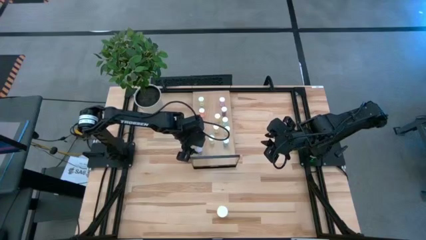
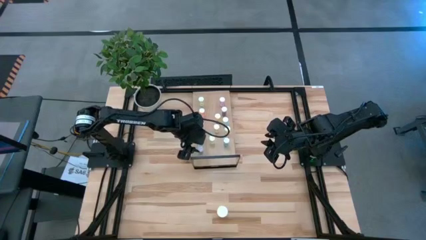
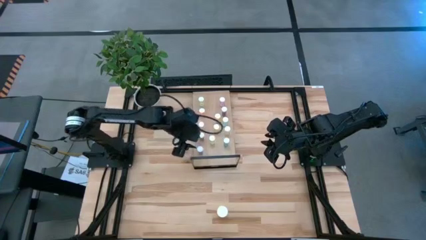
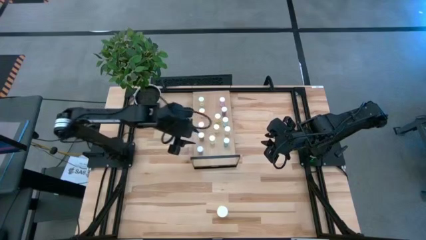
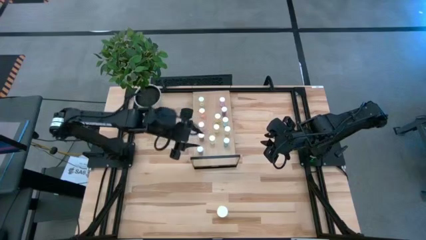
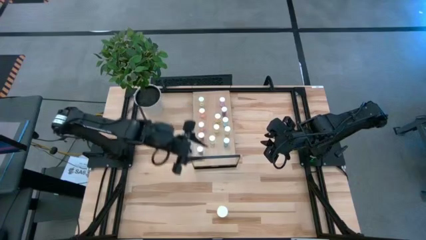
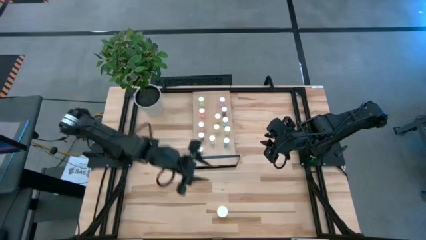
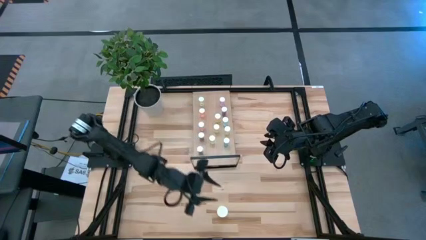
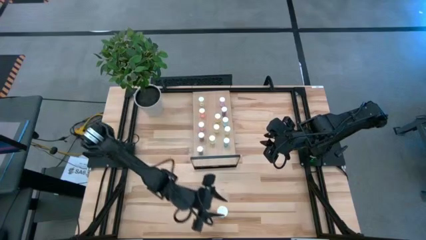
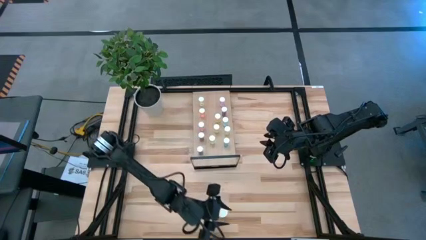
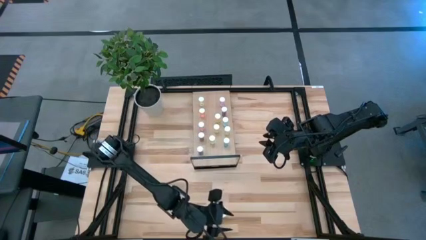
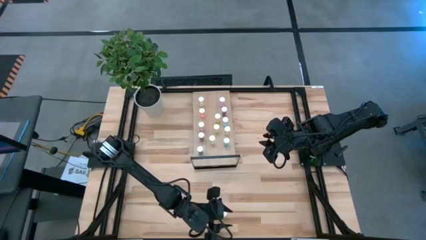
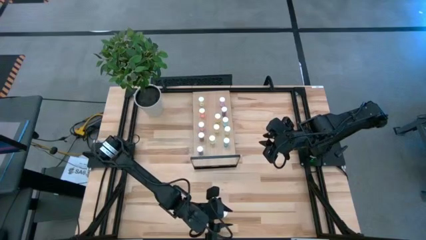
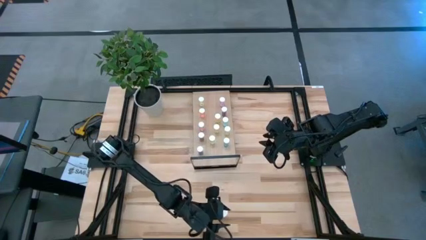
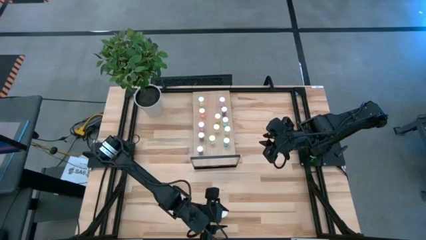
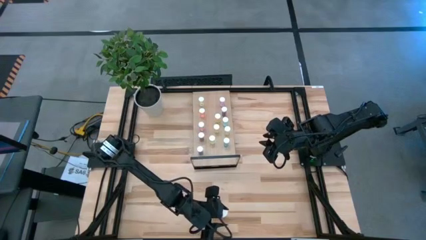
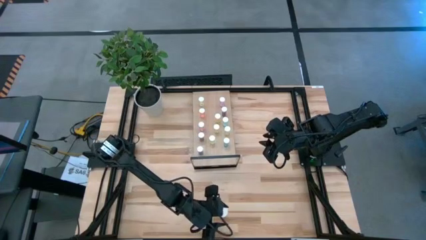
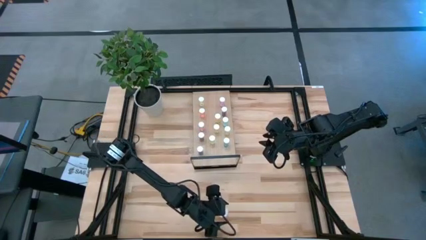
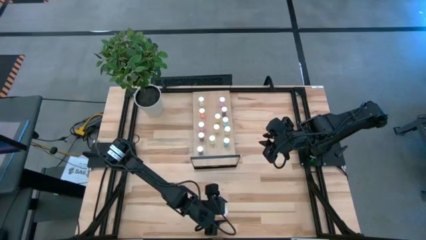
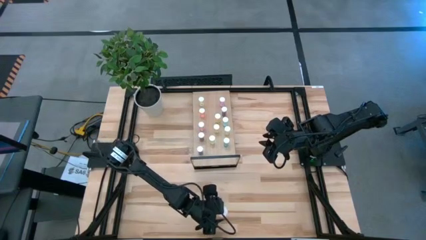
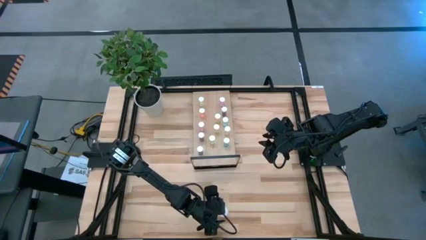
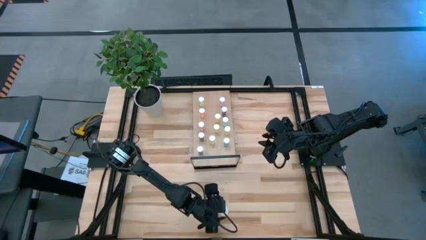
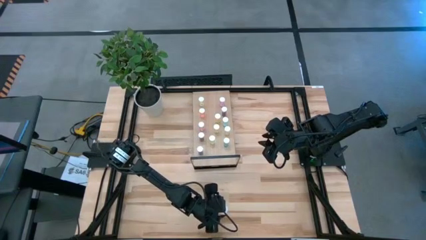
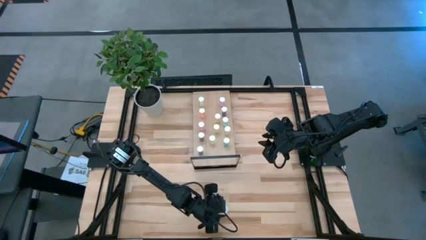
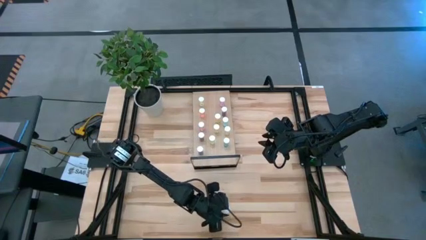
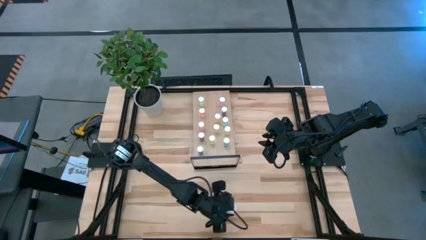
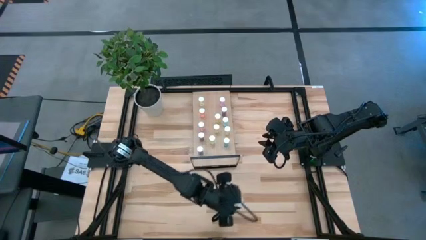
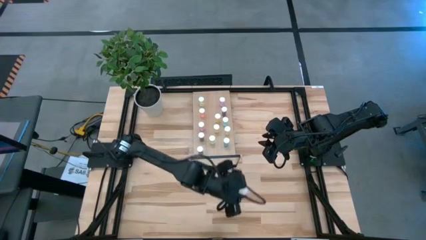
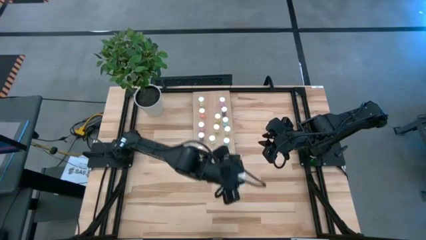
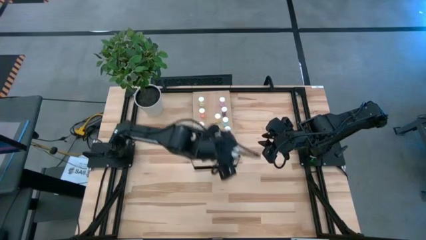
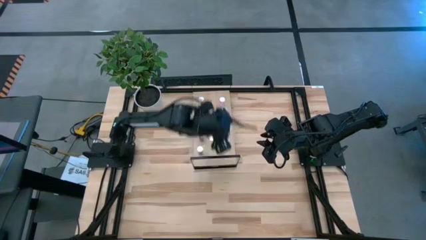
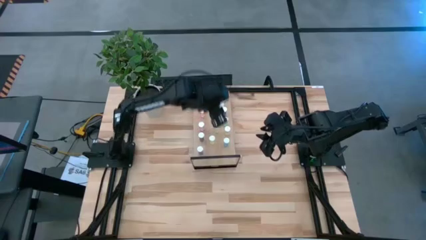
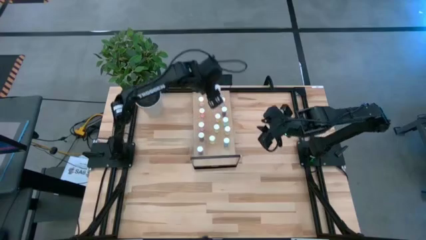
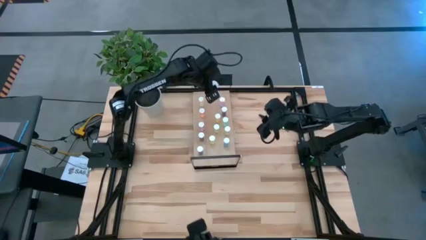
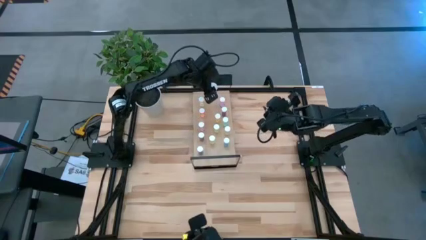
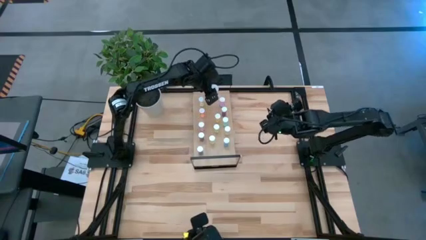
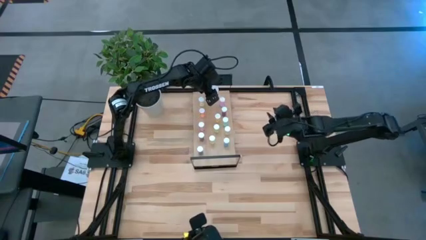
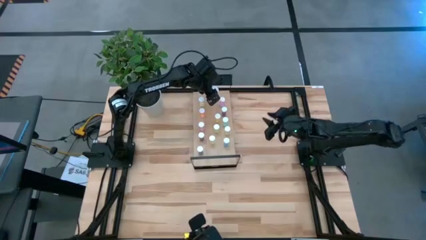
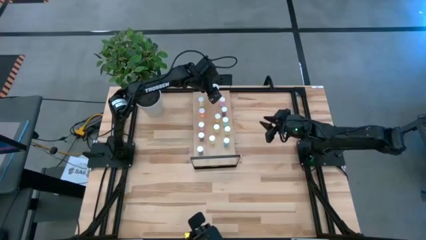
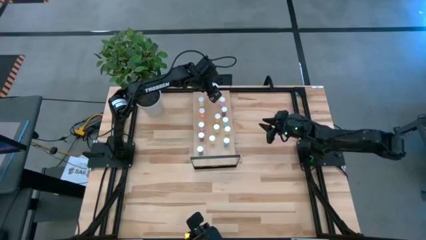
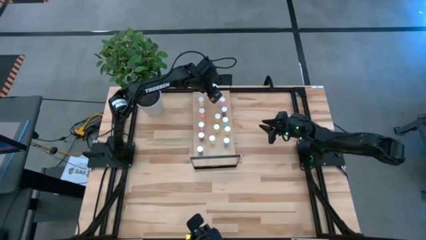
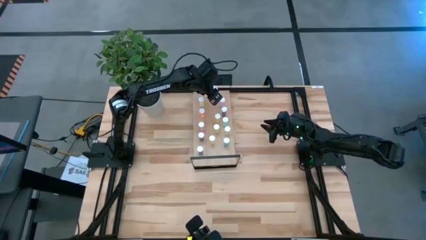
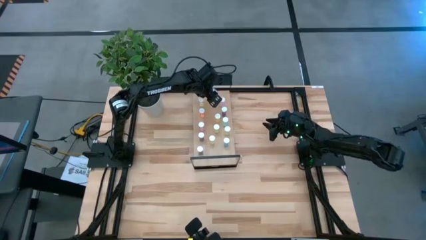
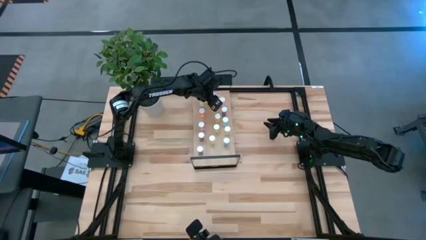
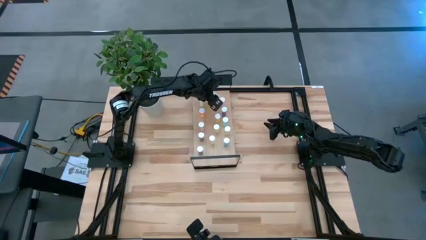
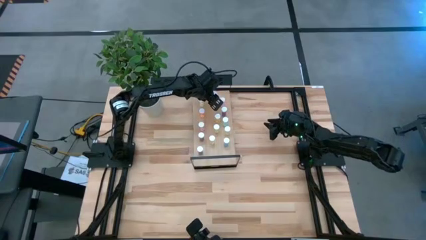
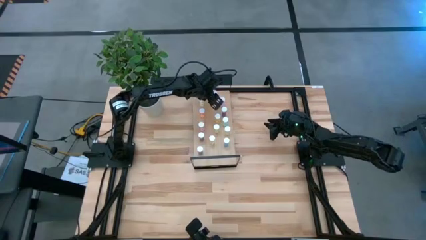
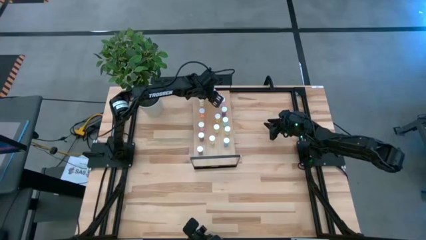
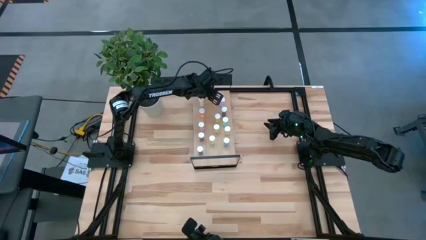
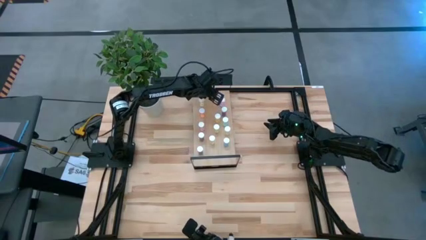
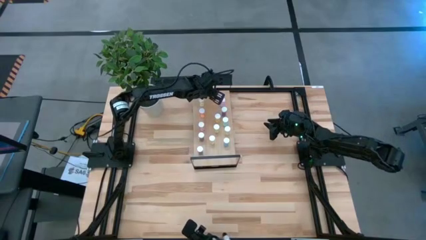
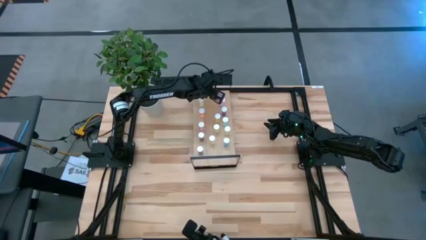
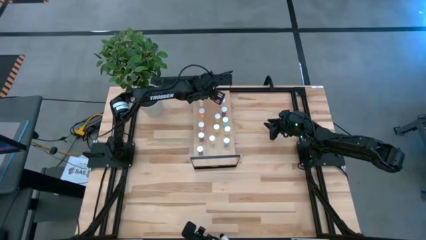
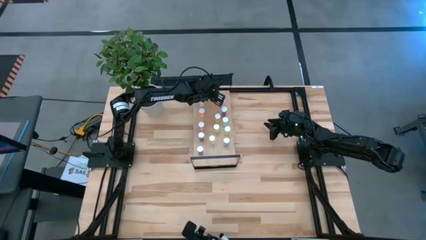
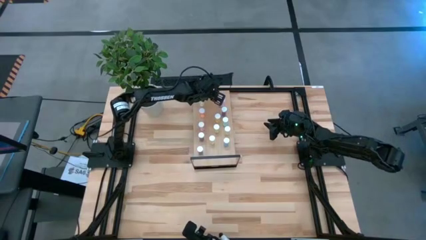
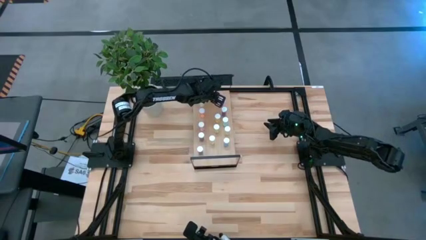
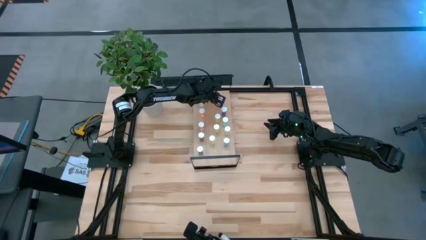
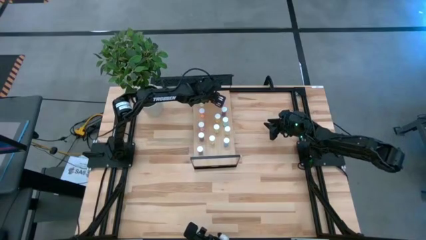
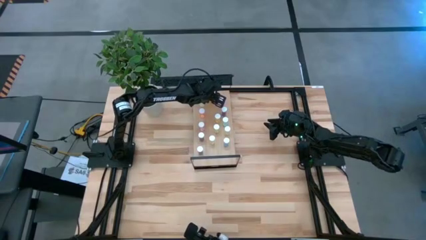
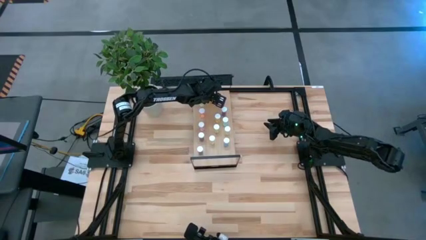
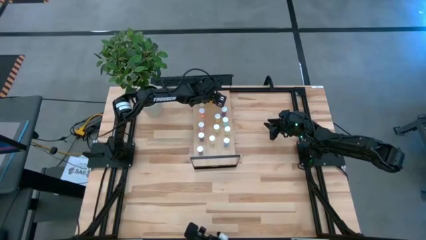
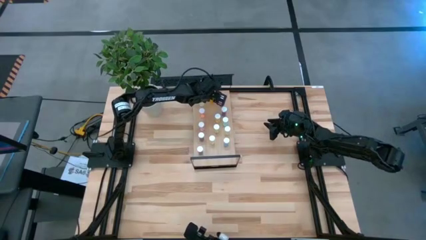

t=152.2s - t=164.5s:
Task: Pick and place medicine bottles onto shelf by color
Put the orange pill bottle on the shelf
